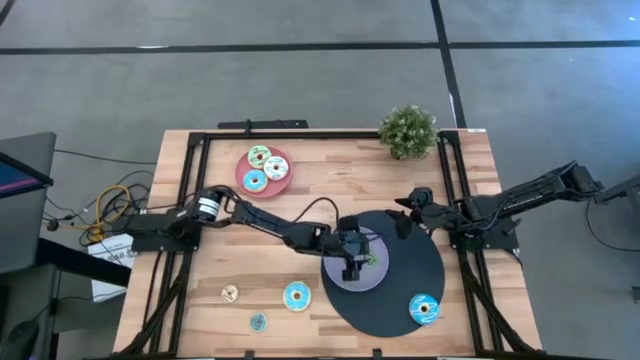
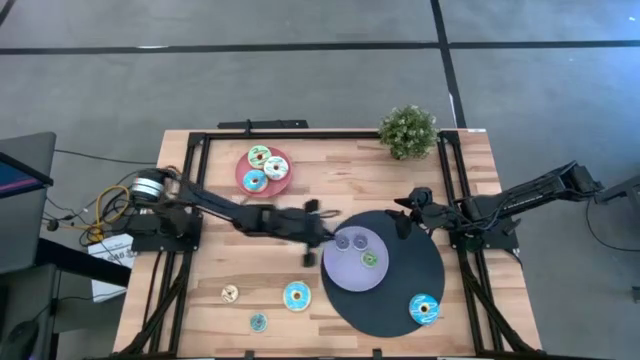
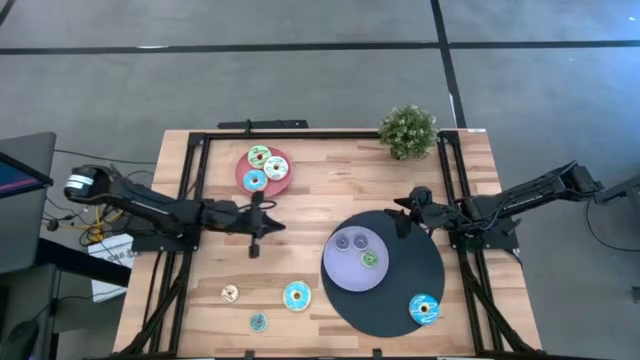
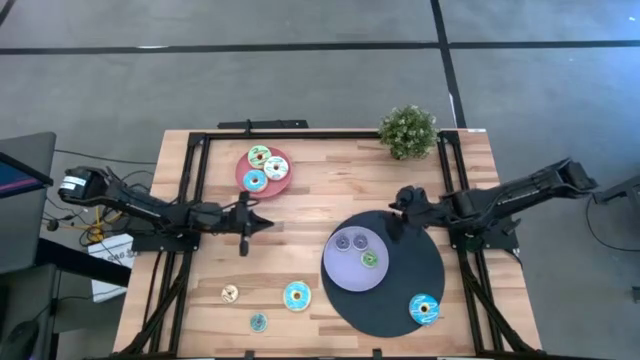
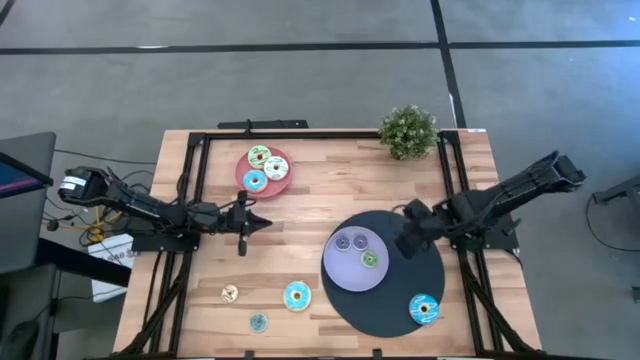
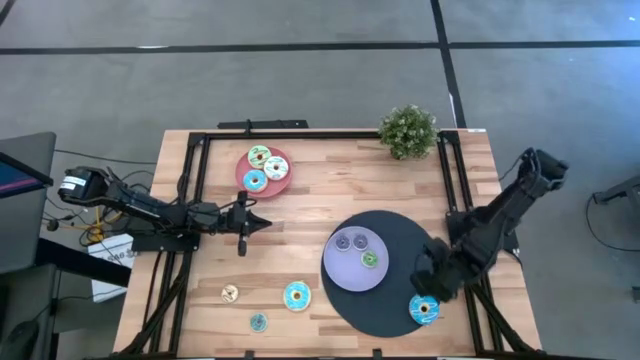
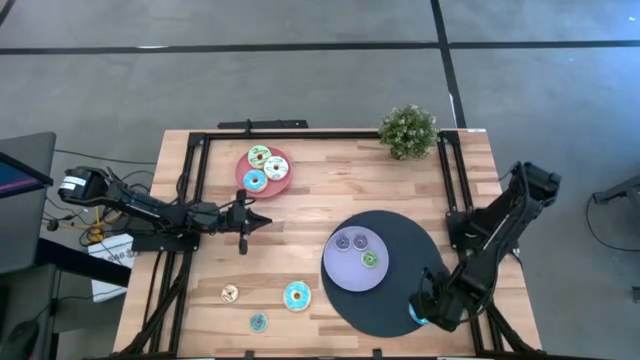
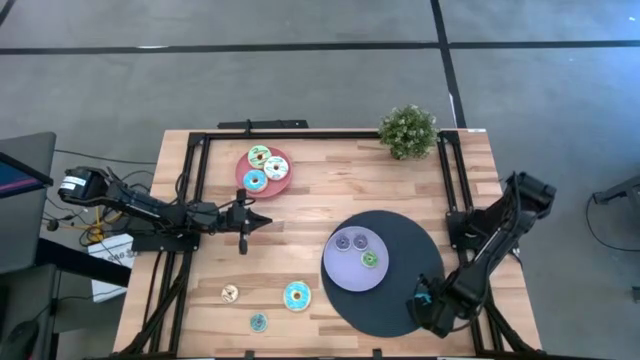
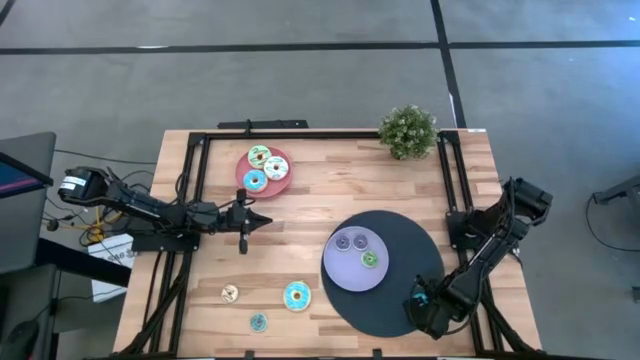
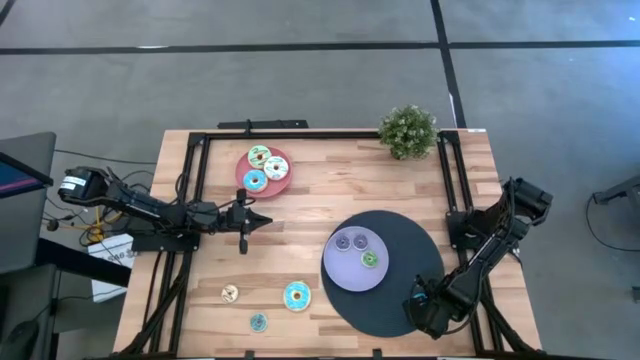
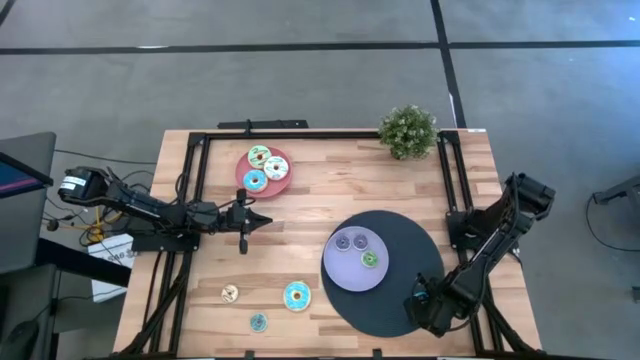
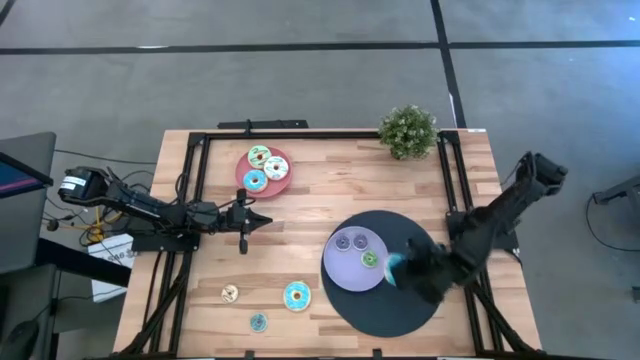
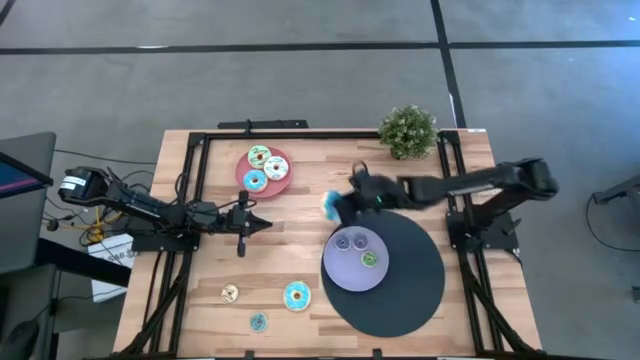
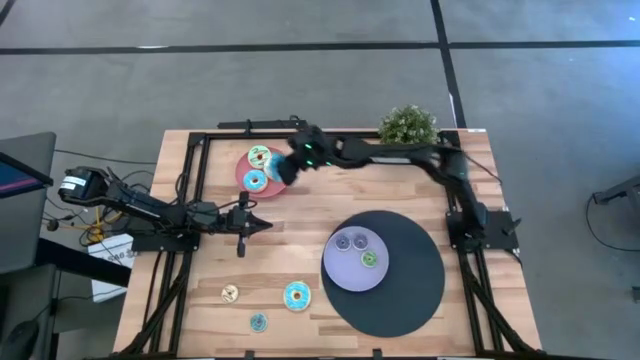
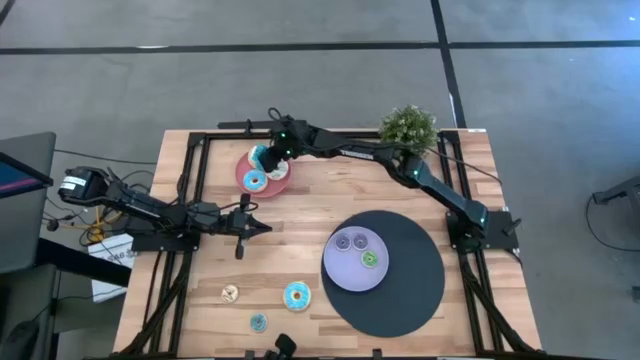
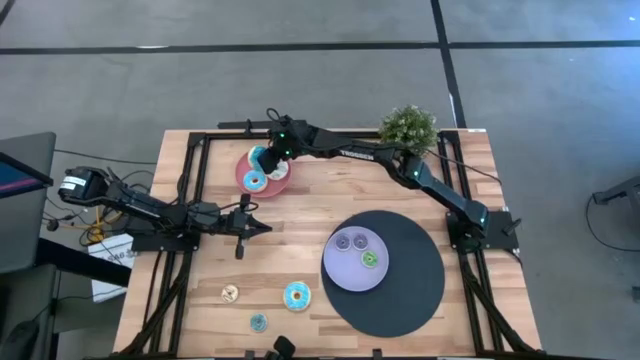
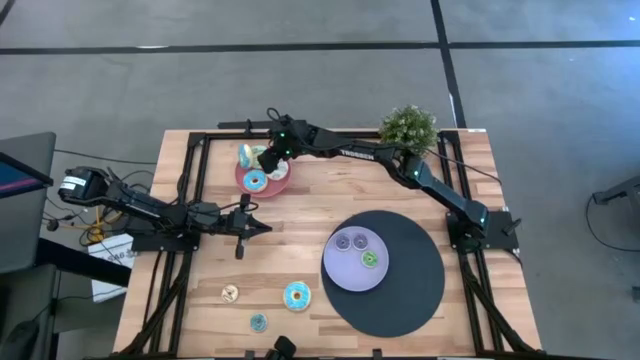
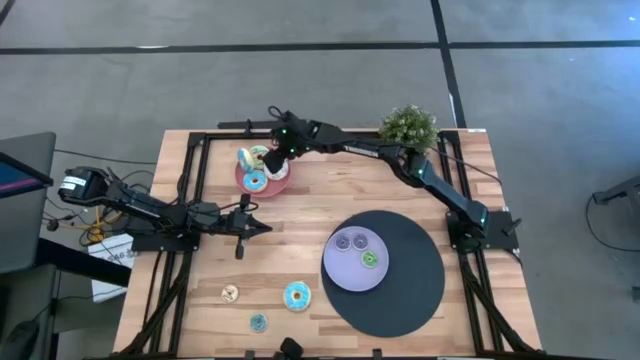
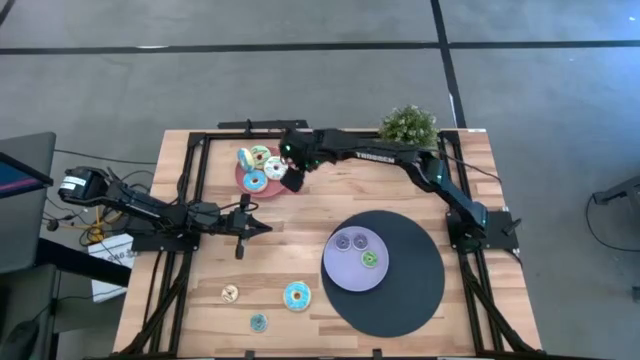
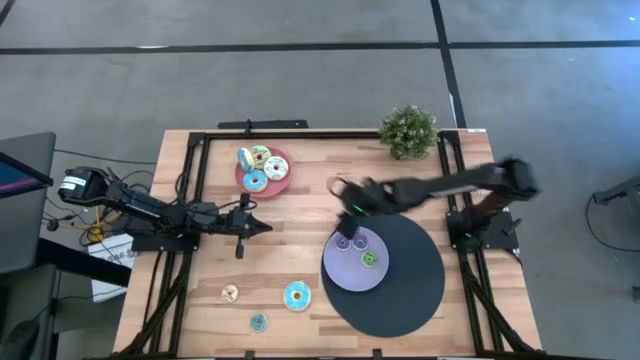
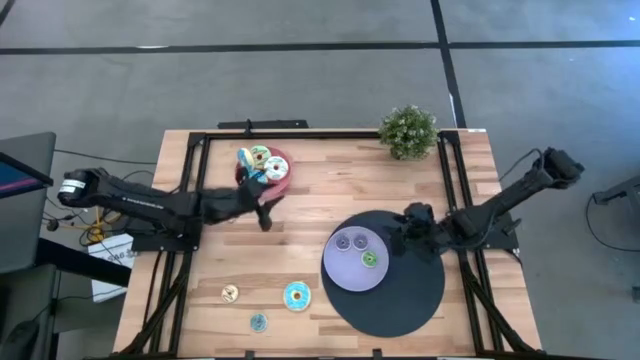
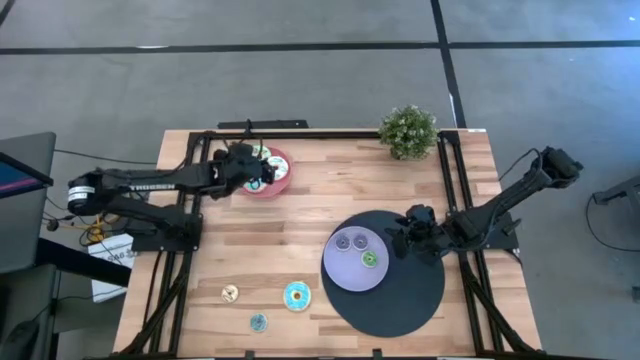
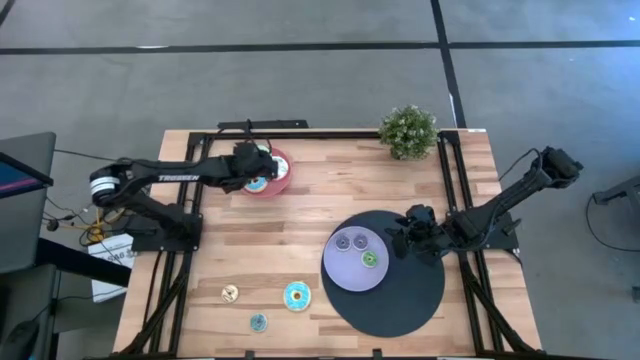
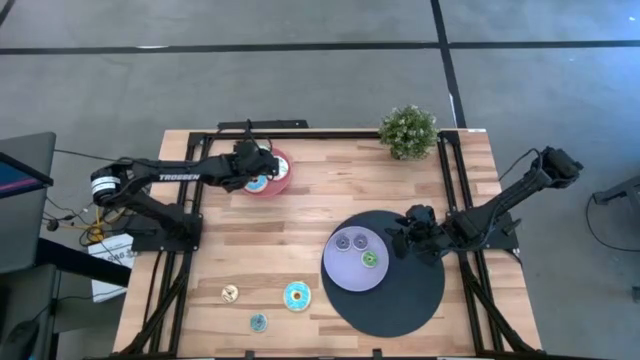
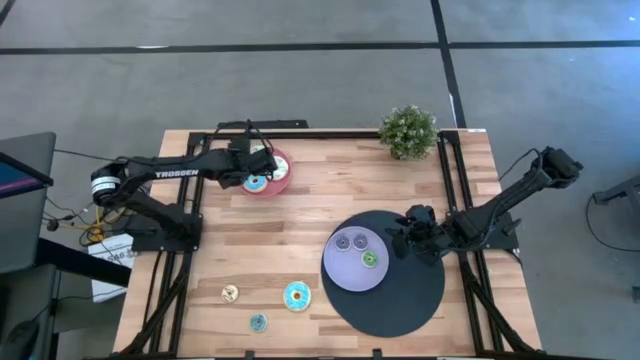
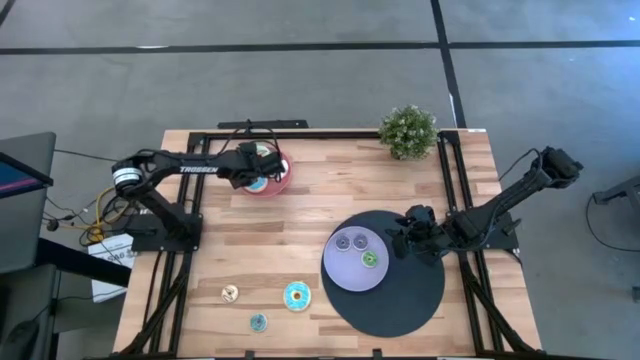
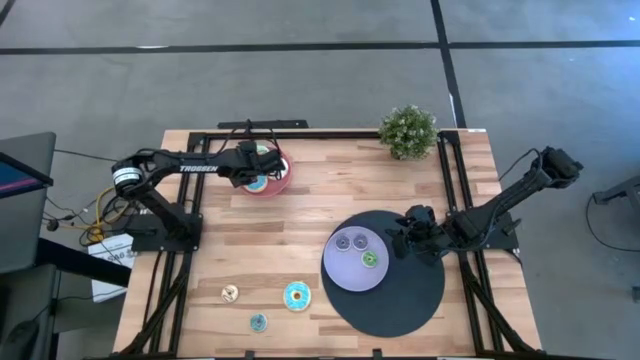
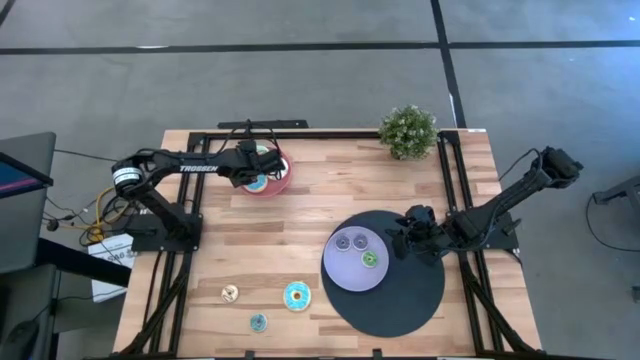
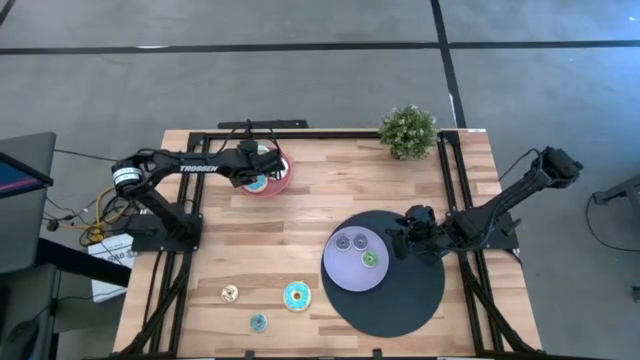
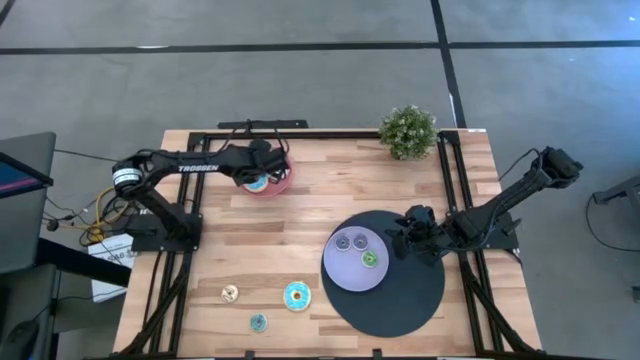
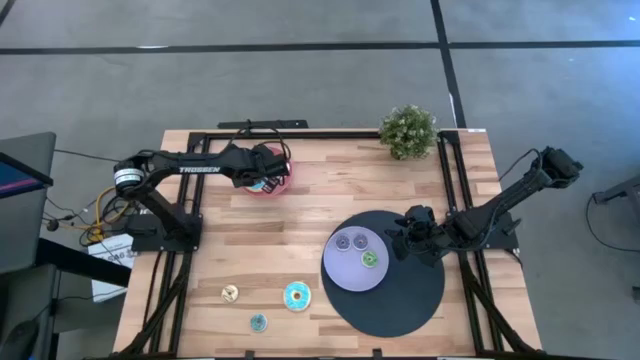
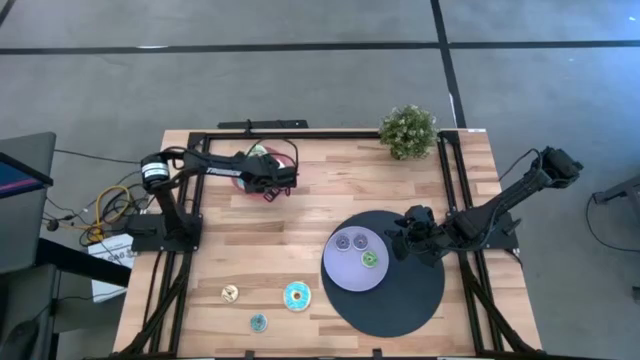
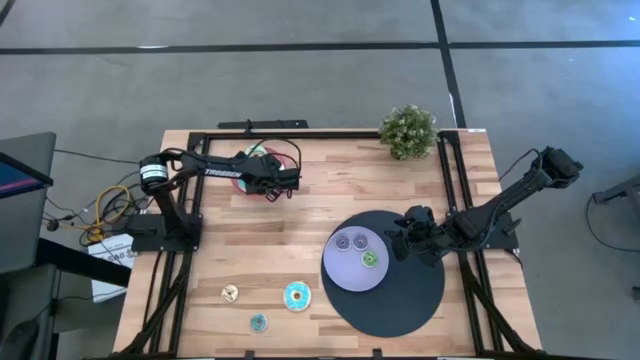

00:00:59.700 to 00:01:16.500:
Task: Pick & Place donuts
Put the big blue donut on the pink plate

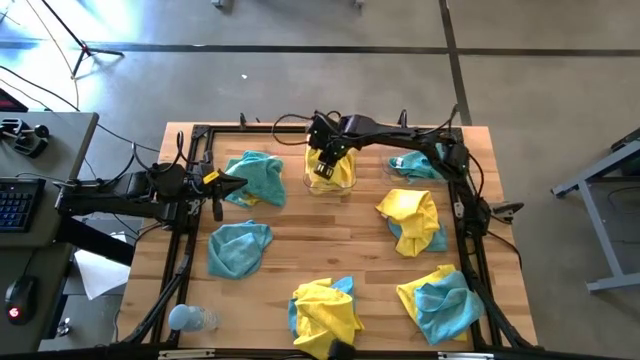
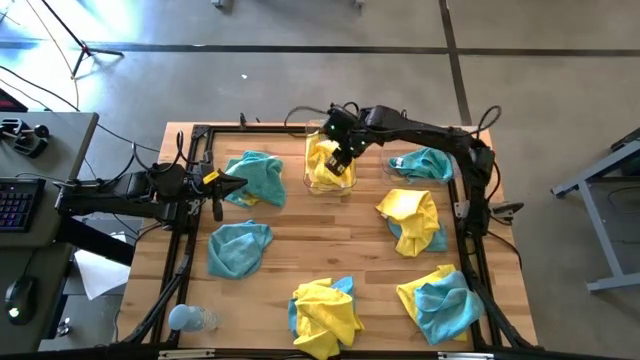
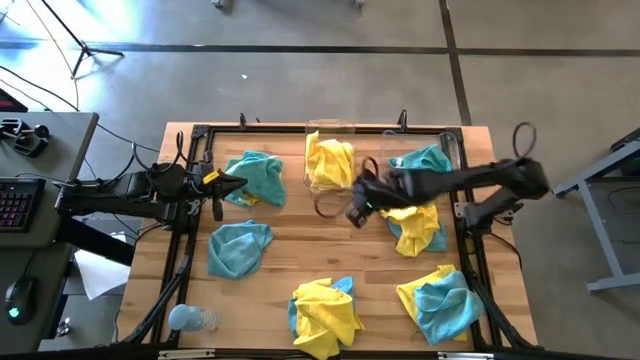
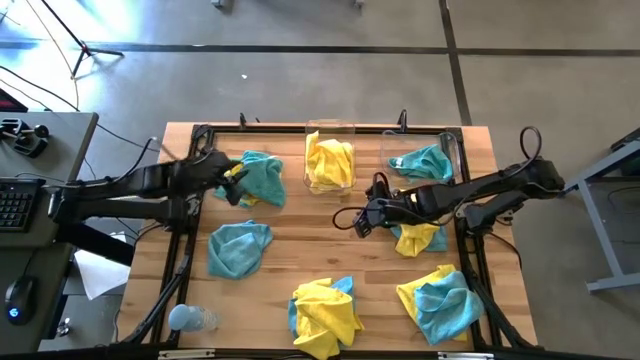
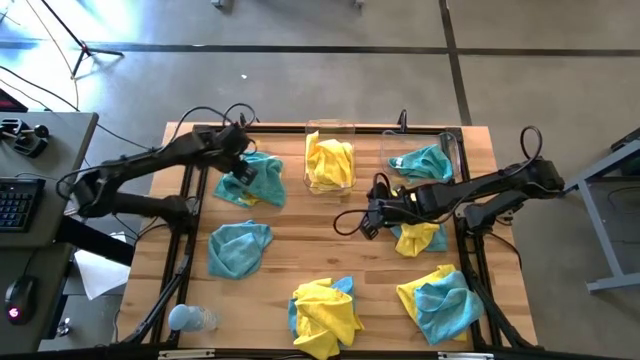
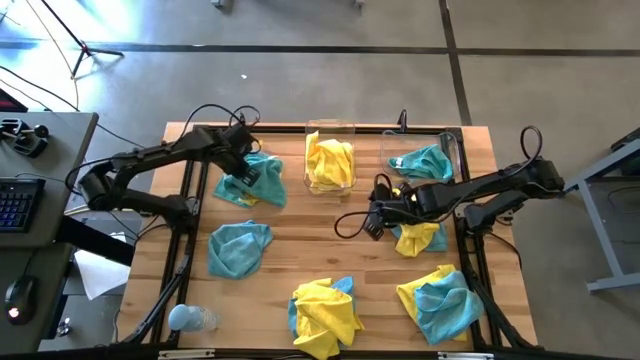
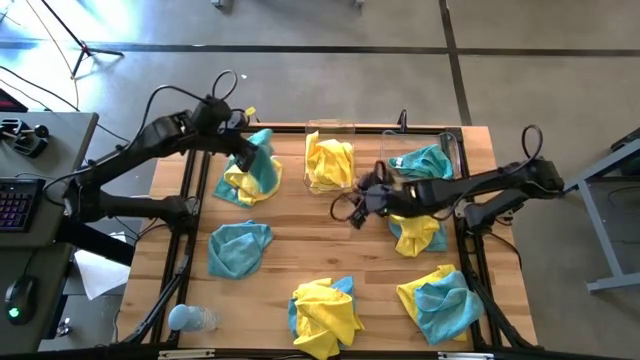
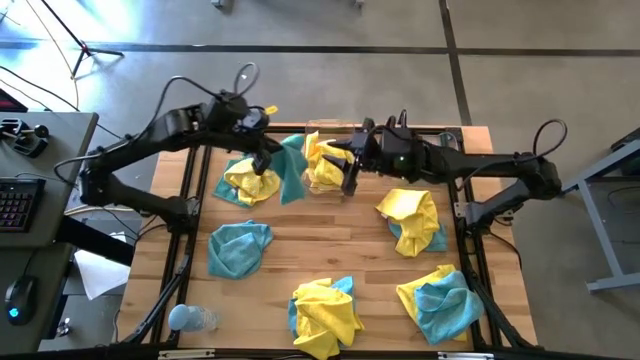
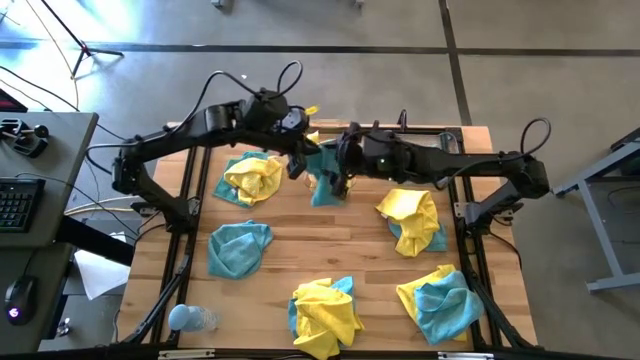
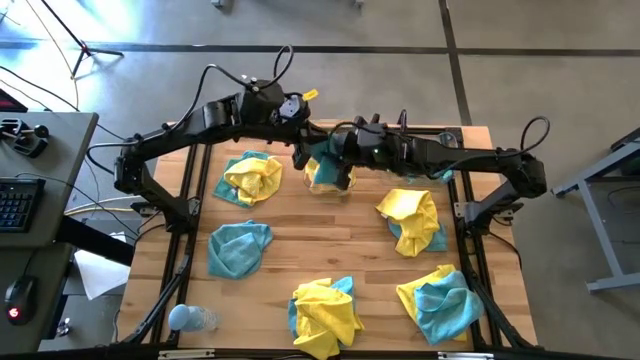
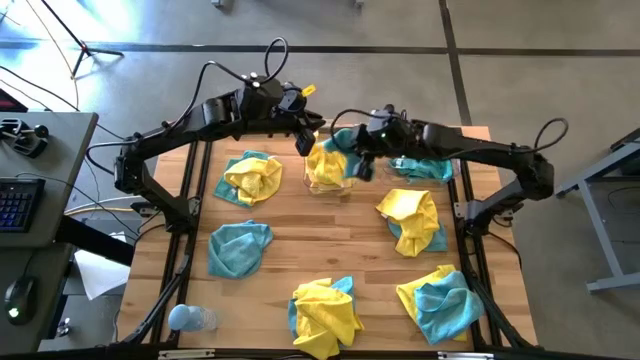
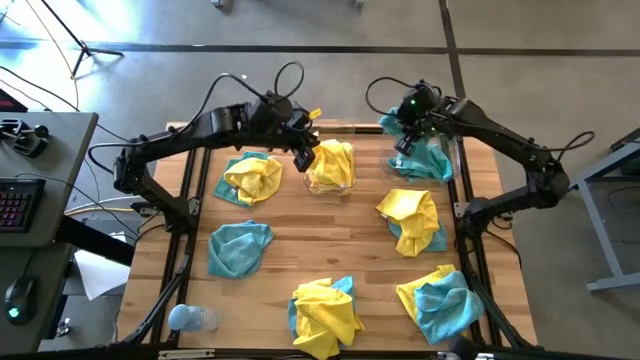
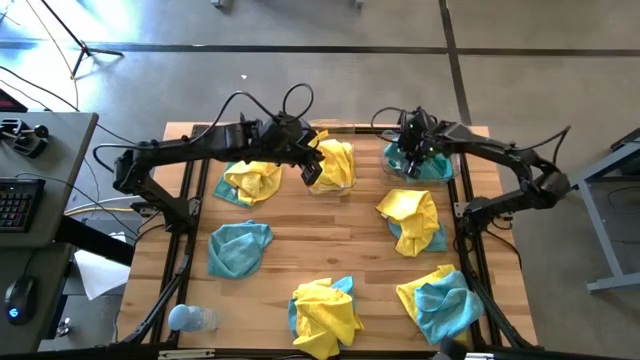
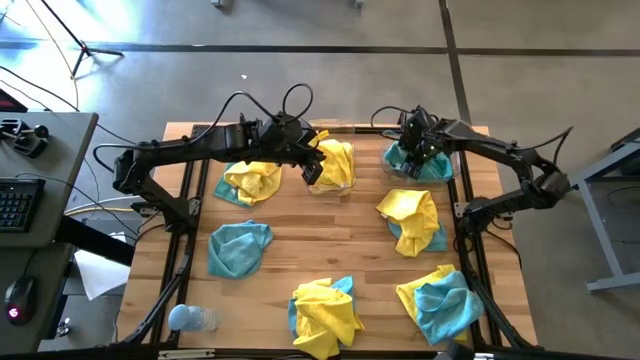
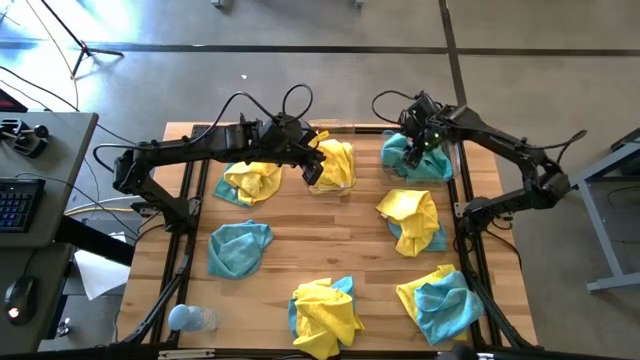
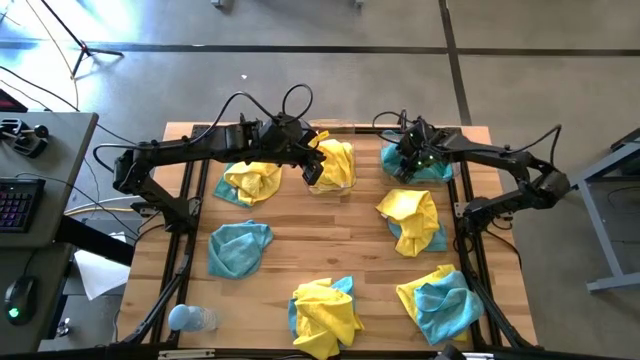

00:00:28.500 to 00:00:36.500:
Task: Sort microfiber towel by color & place in baskets
Put the blue towel into the right transparent bin
